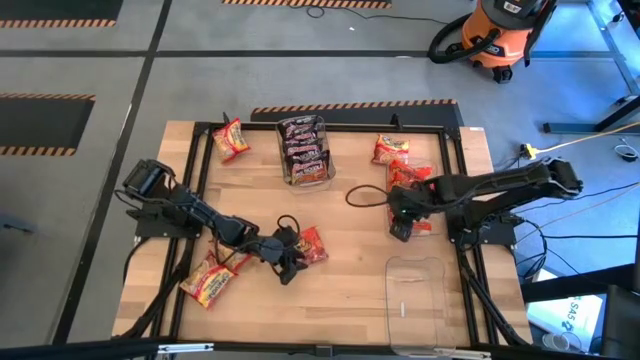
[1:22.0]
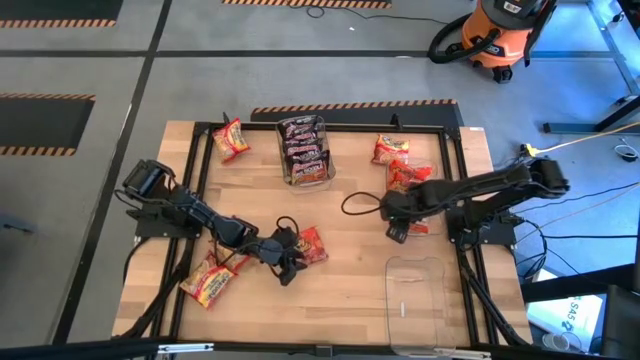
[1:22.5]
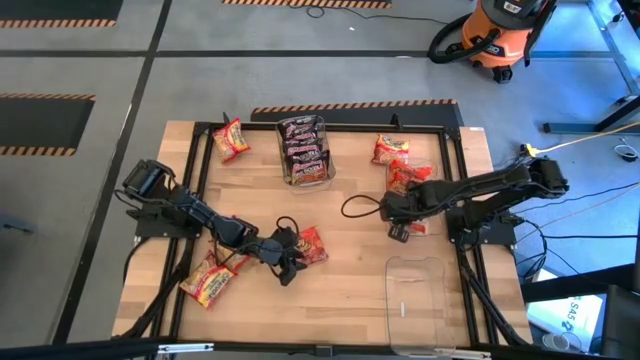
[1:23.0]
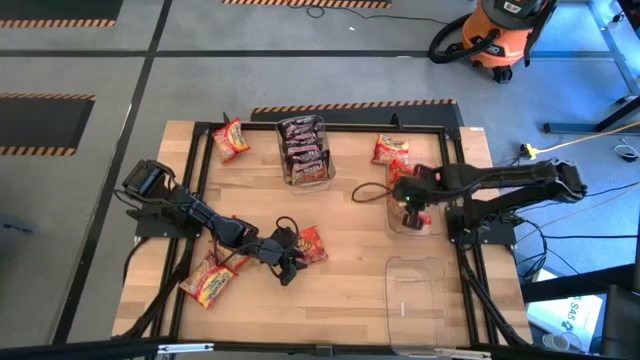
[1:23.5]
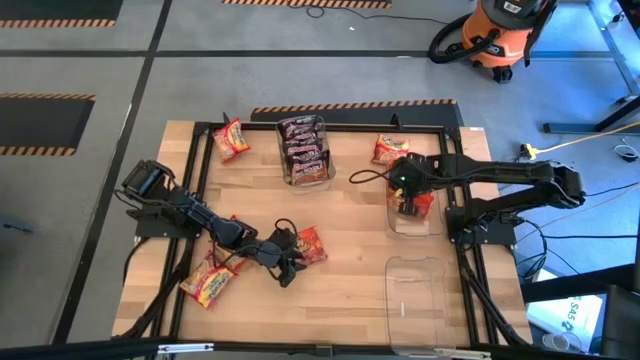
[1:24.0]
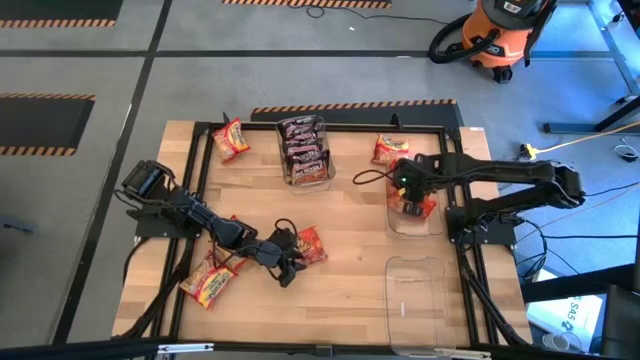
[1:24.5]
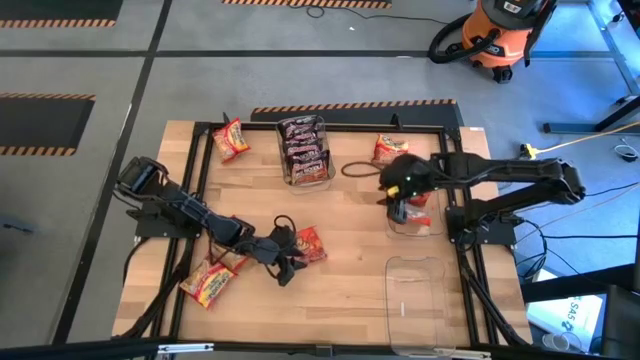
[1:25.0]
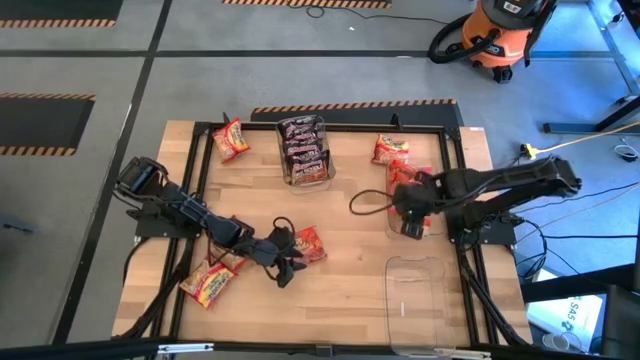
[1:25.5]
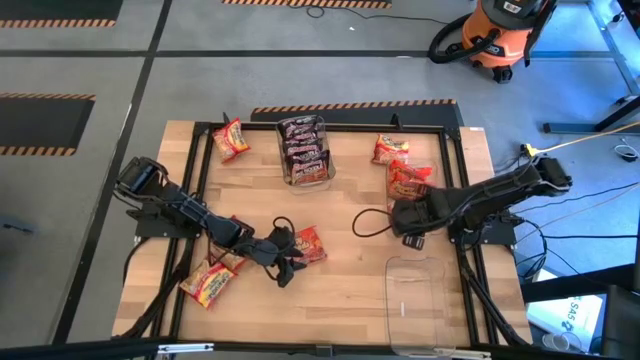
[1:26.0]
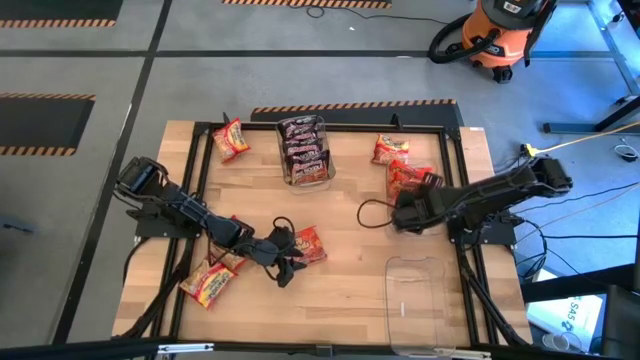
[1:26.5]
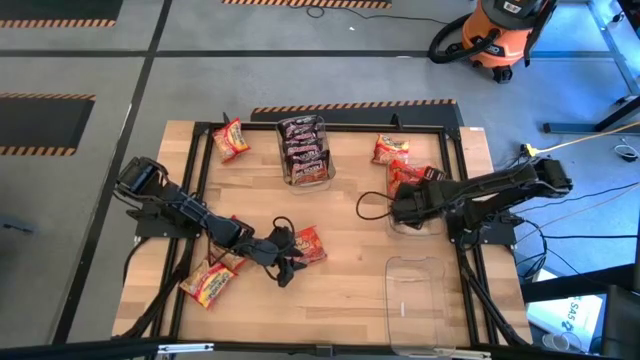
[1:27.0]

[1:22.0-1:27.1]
Task: Sort Maruchan noodles
Adjust the orange noodle pack on the middle transparent bin

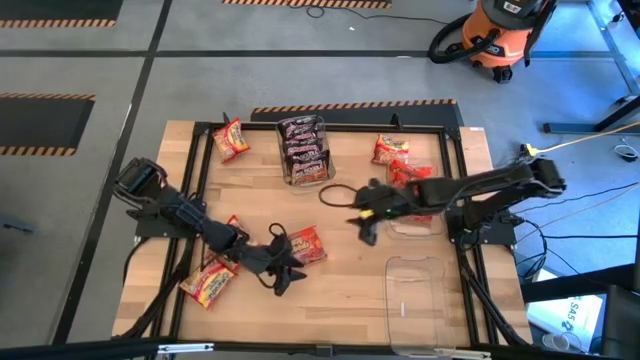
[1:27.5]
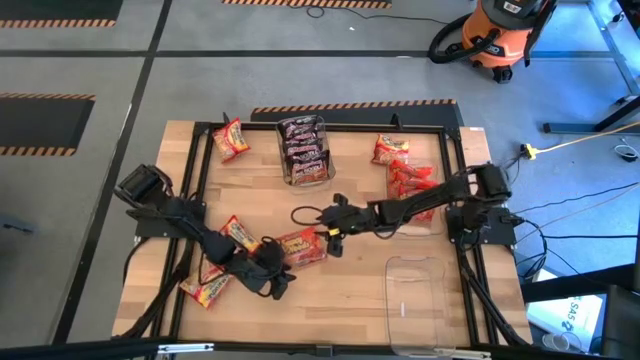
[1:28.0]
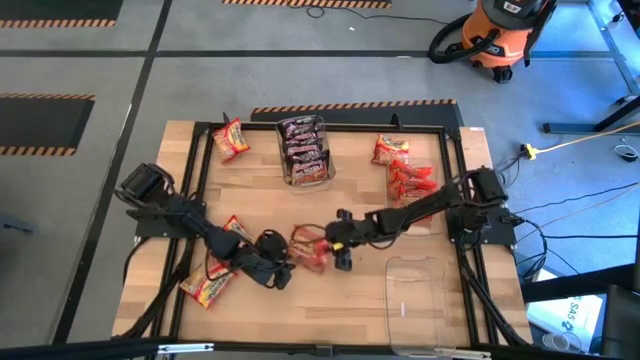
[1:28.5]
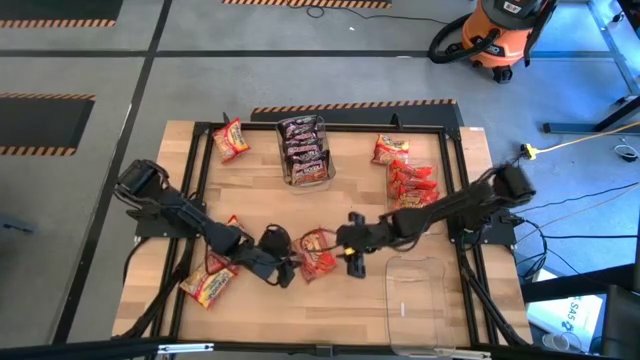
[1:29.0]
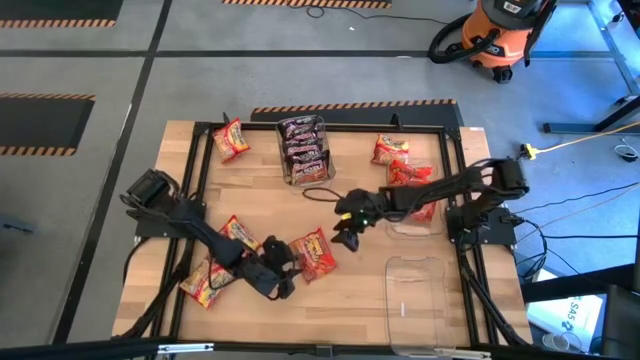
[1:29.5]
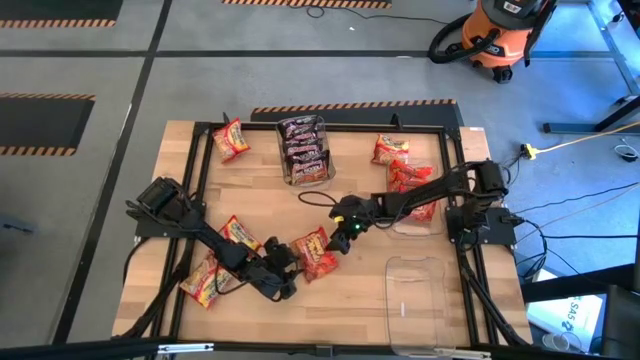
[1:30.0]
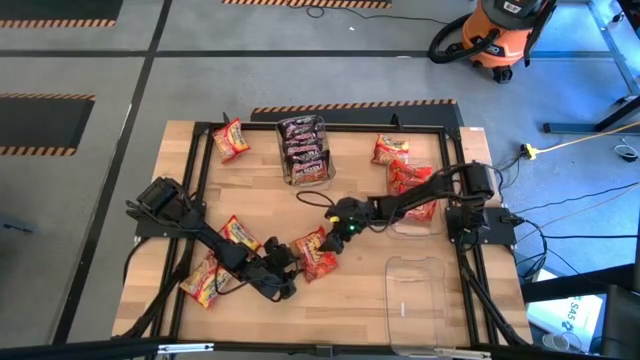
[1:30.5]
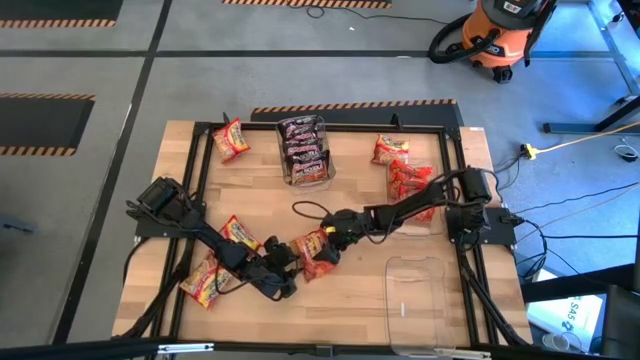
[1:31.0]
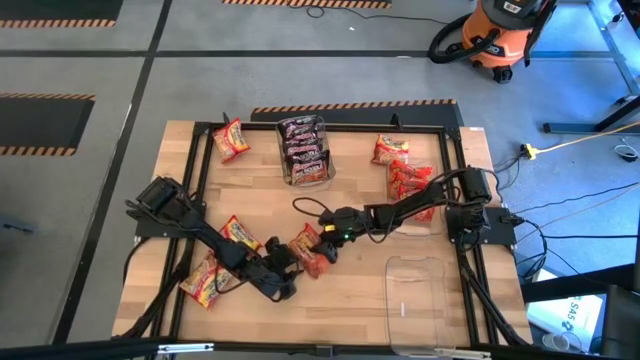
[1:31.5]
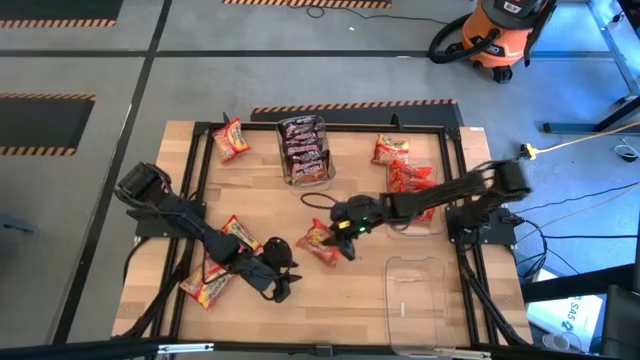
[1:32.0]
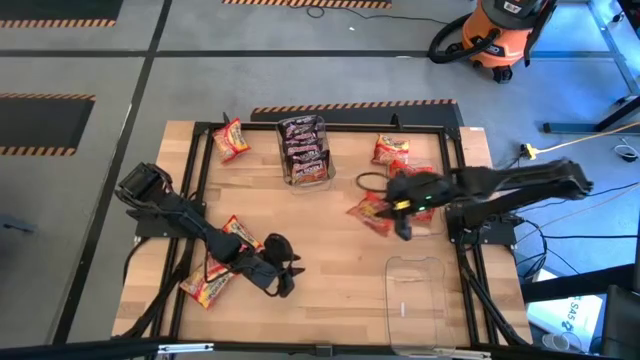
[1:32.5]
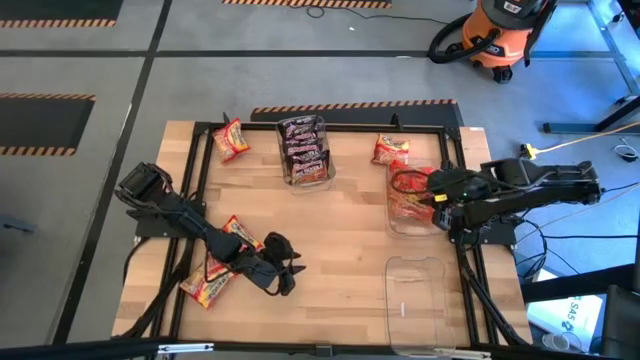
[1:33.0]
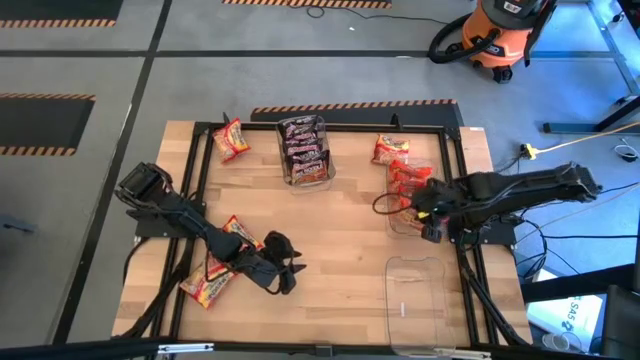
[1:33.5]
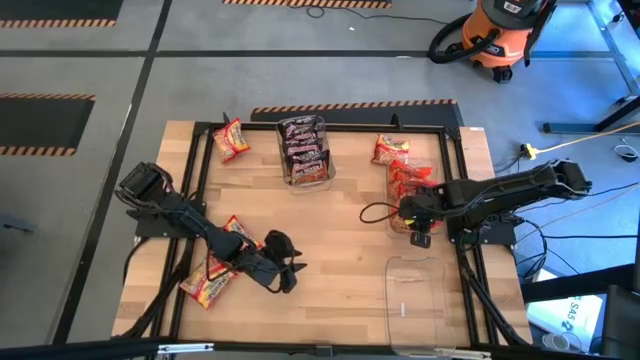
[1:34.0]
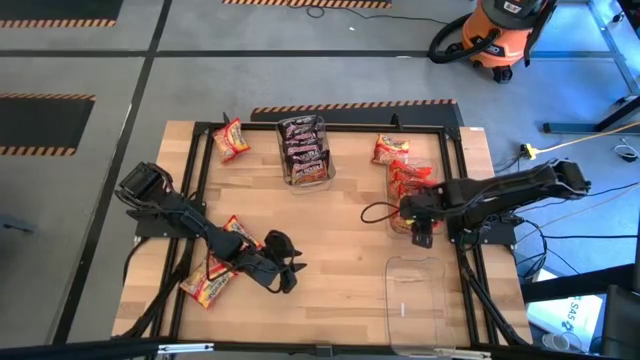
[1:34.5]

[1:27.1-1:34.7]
Put the orange noodle pack into the middle transparent bin

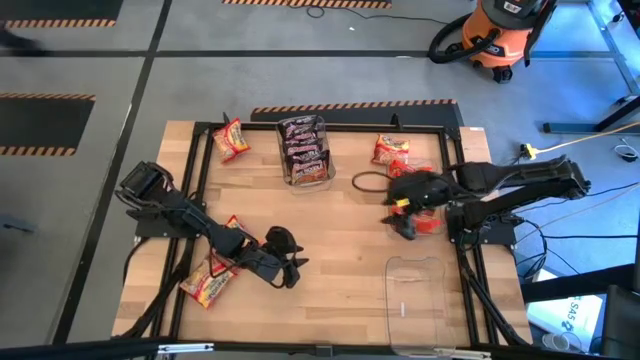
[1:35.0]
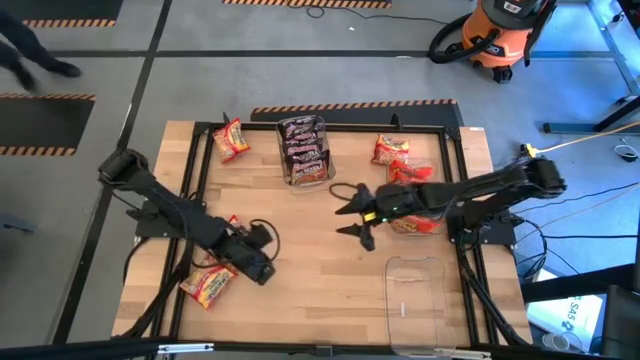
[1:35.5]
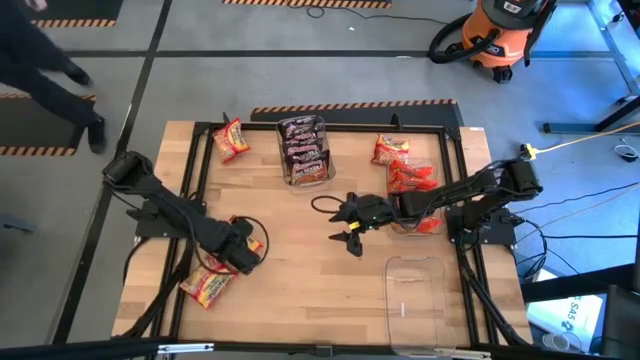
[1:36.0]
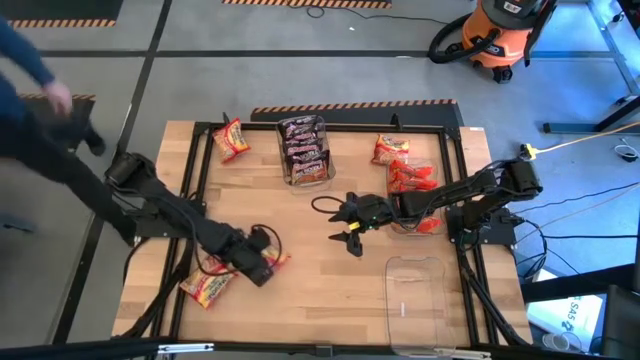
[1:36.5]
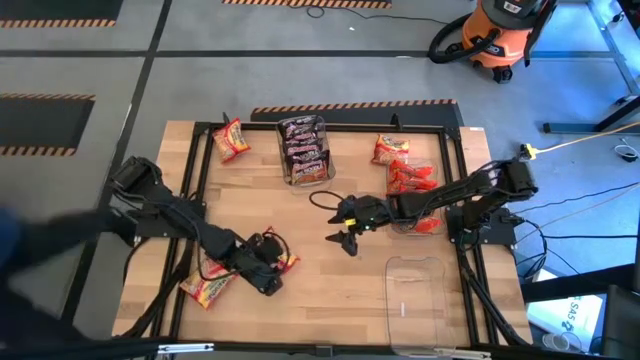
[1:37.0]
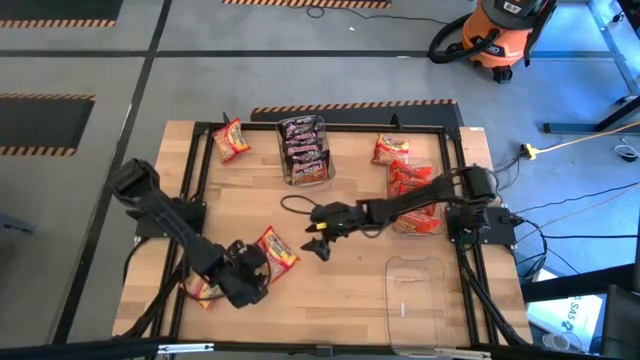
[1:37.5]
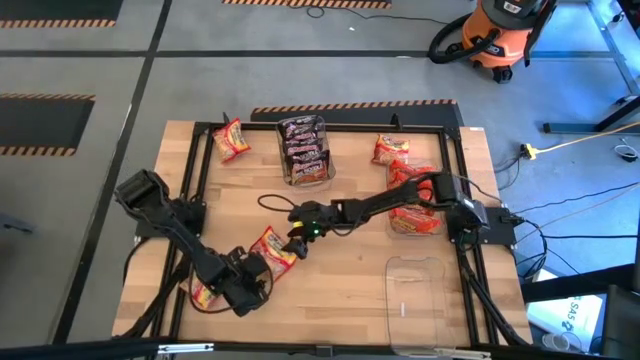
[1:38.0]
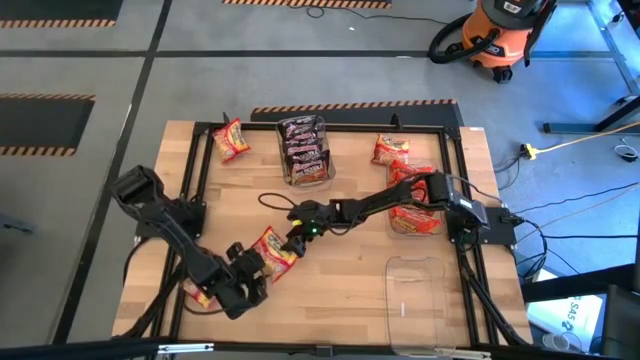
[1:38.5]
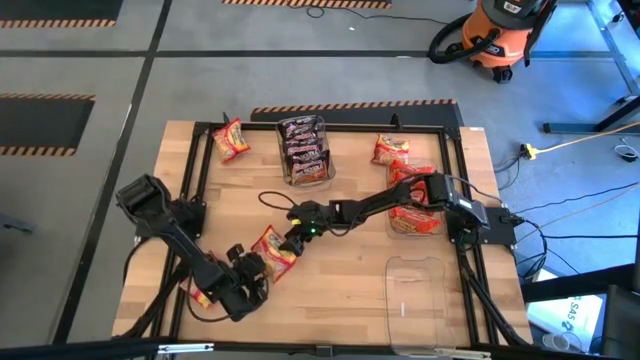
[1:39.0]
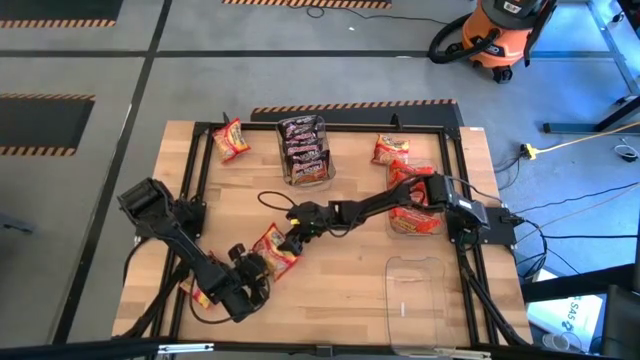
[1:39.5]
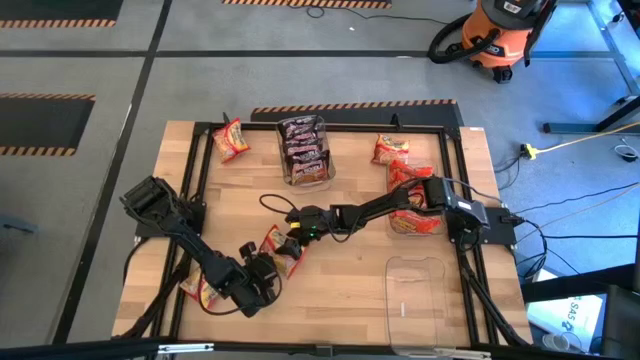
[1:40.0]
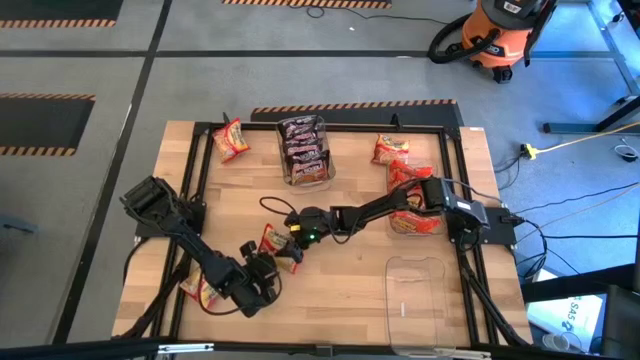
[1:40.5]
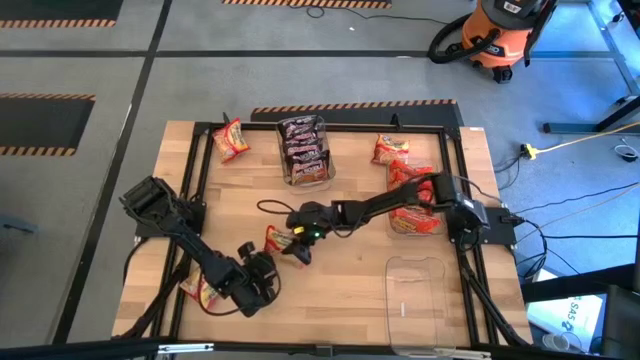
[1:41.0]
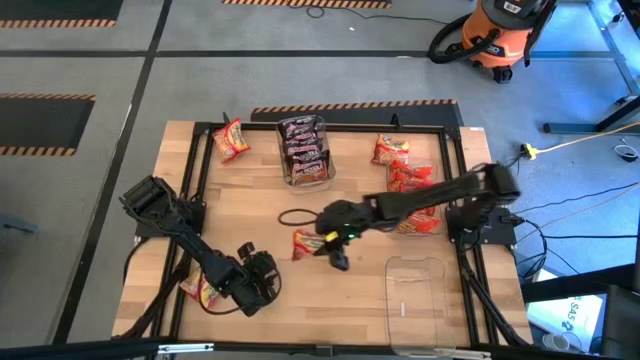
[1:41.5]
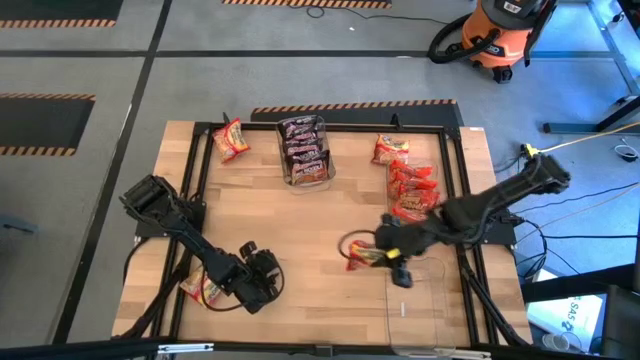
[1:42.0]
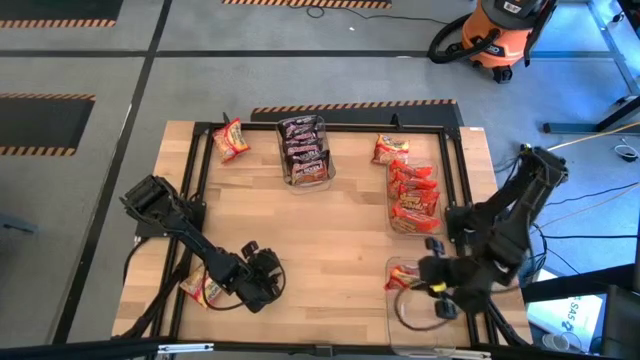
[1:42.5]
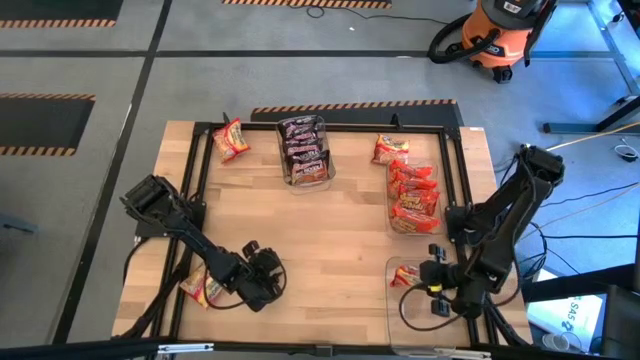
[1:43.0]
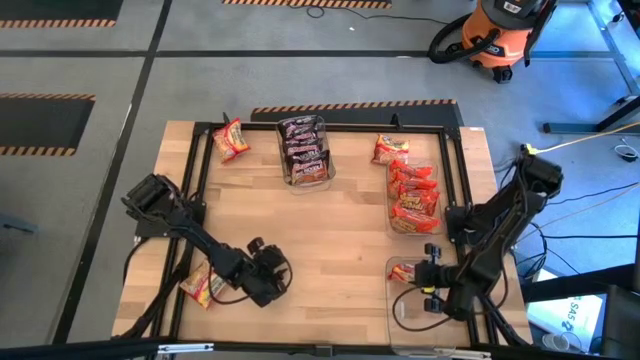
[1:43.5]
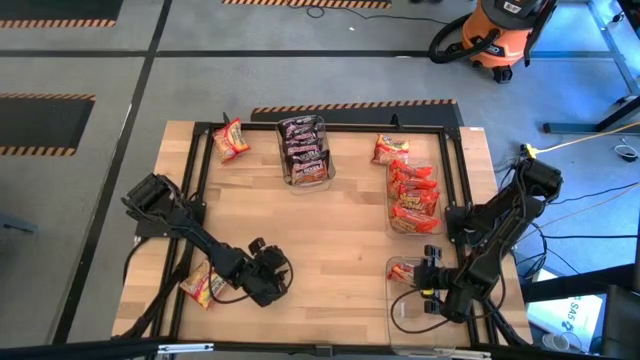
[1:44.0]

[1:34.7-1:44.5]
Put the red noodle pack into the bottom transparent bin
